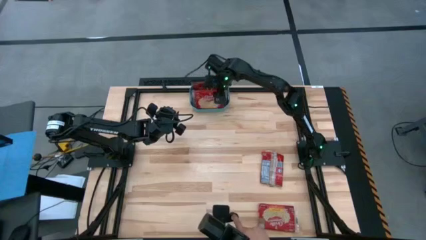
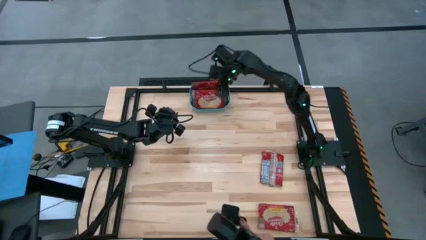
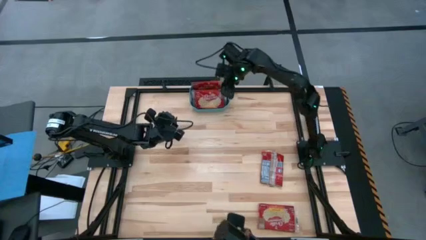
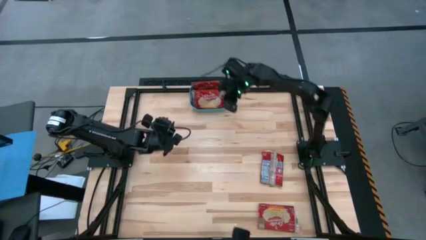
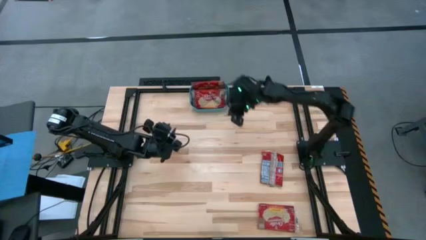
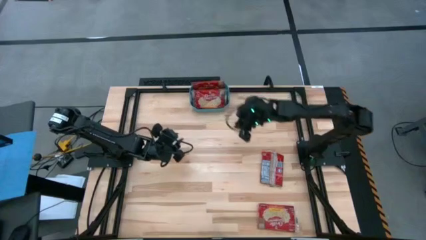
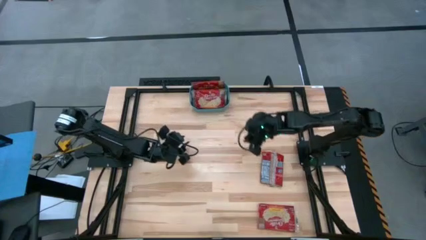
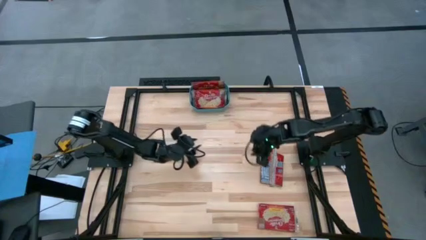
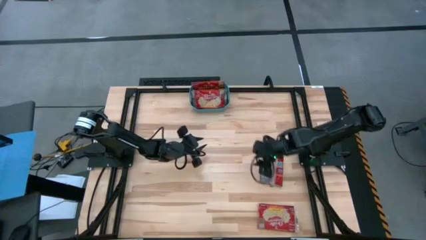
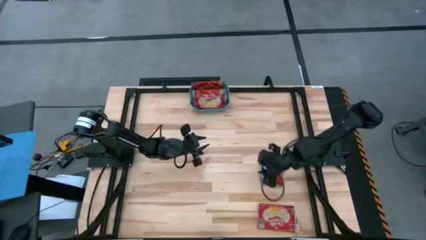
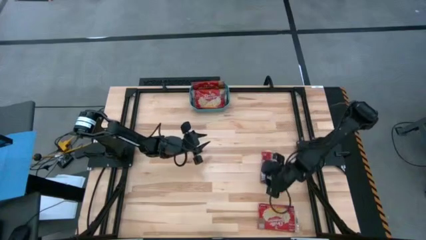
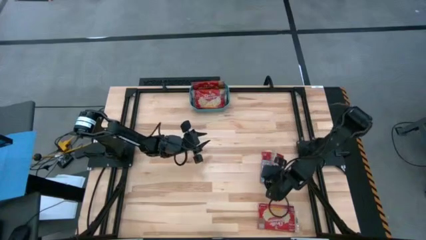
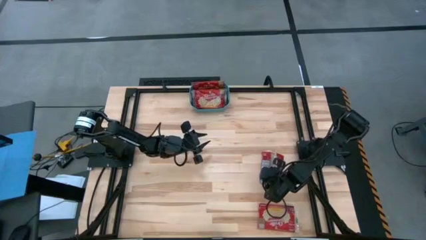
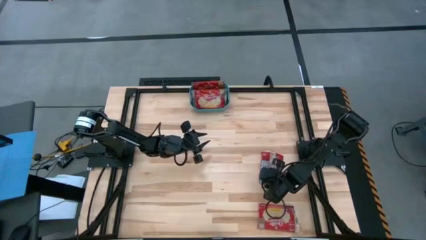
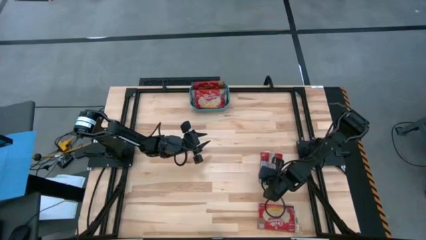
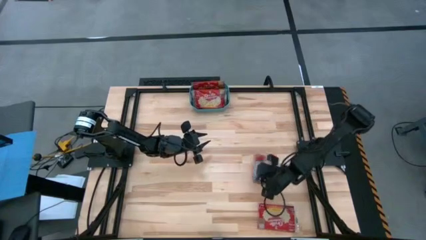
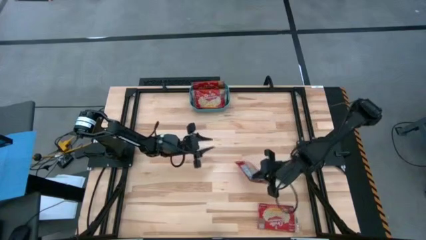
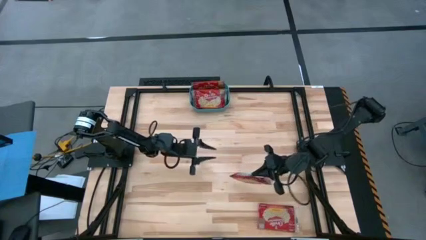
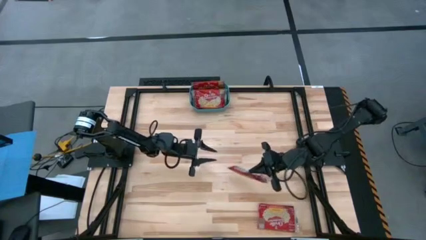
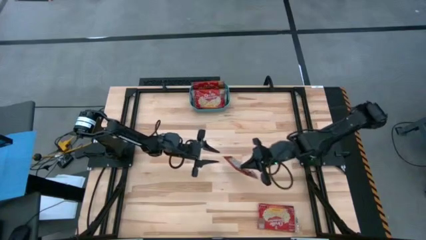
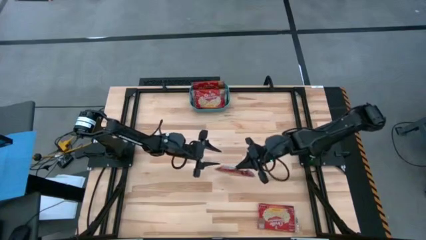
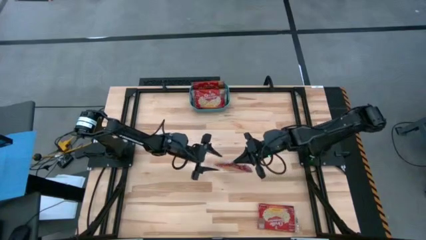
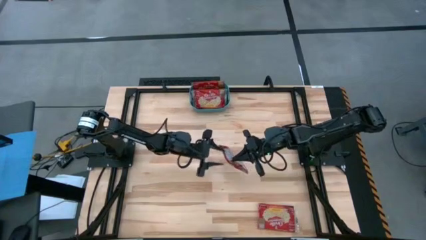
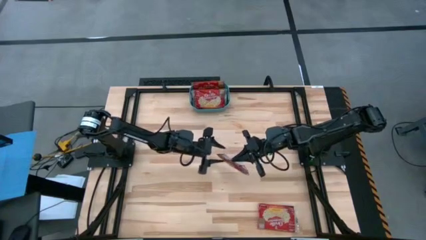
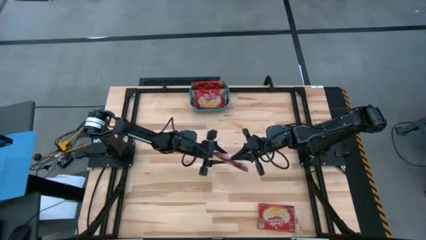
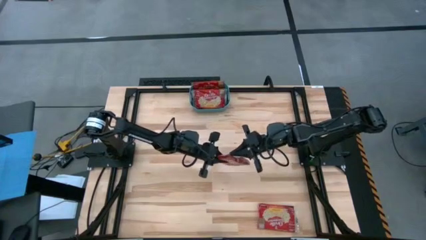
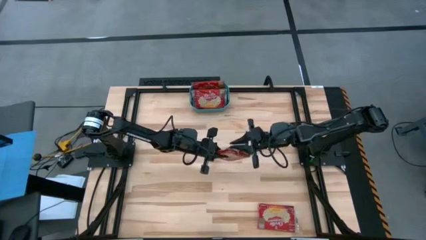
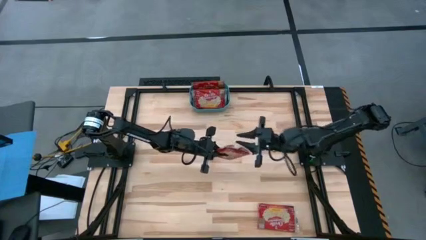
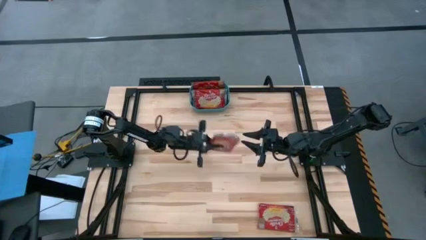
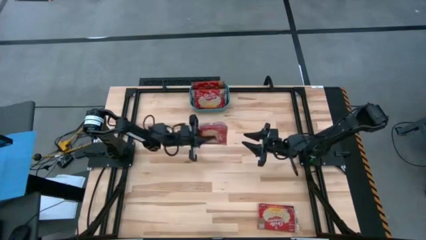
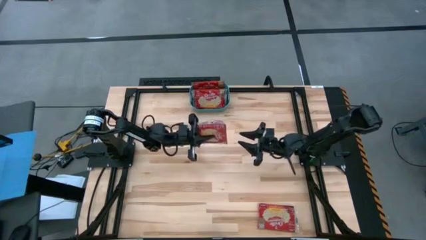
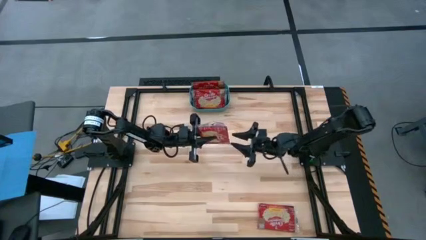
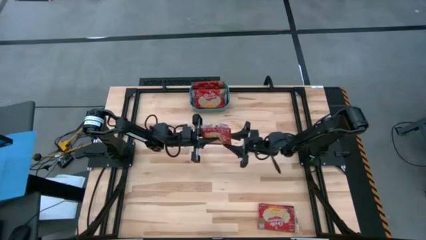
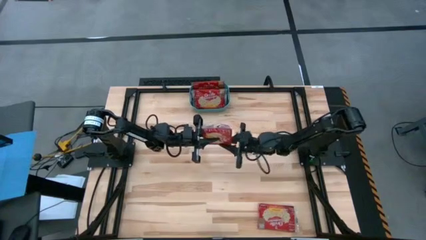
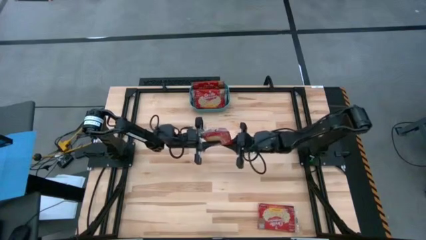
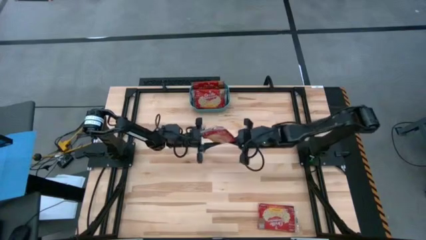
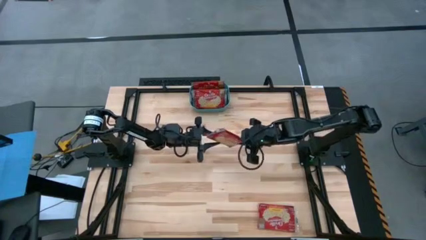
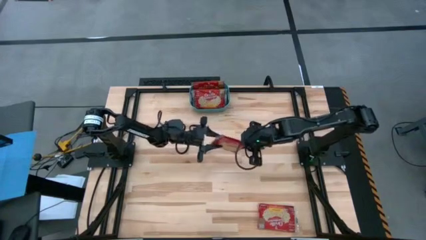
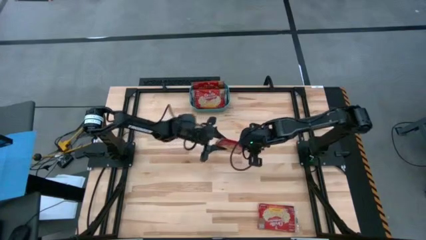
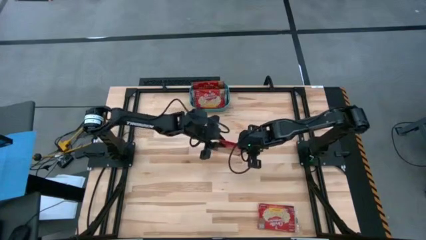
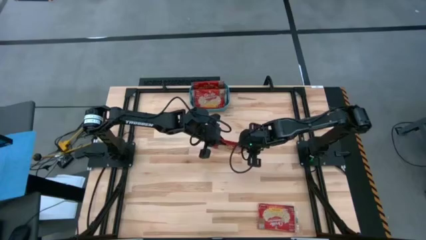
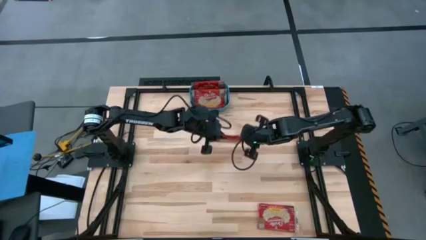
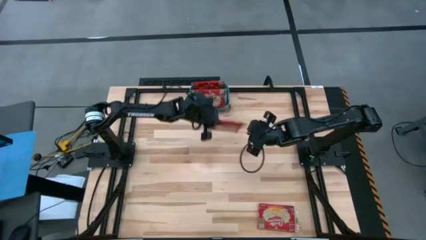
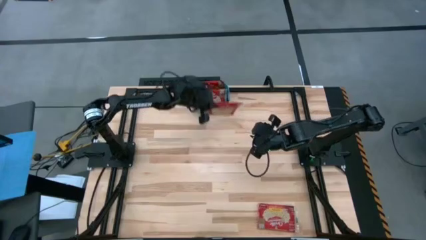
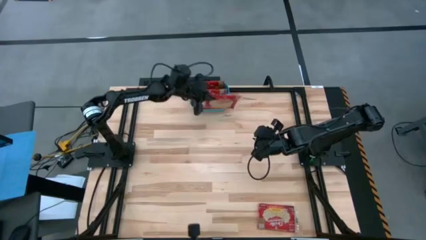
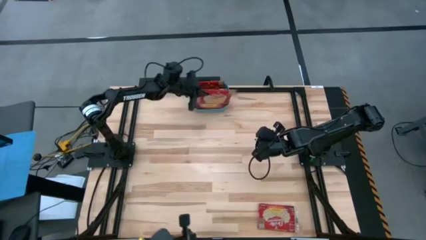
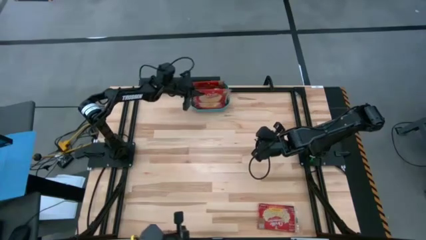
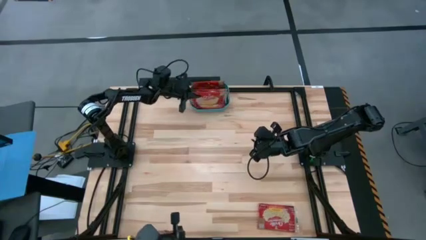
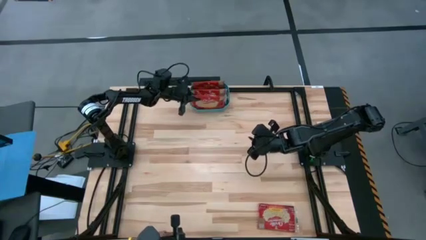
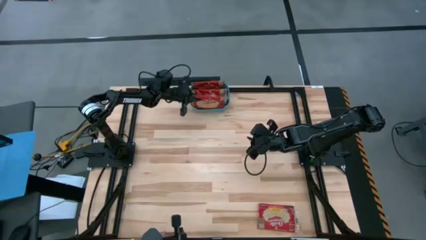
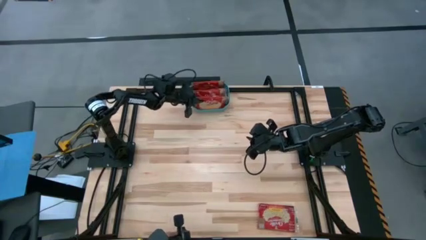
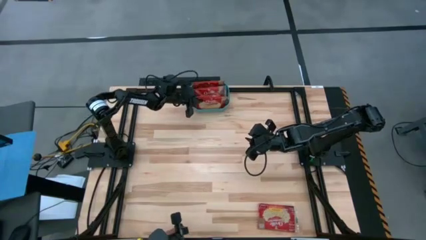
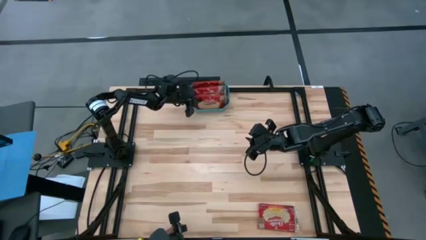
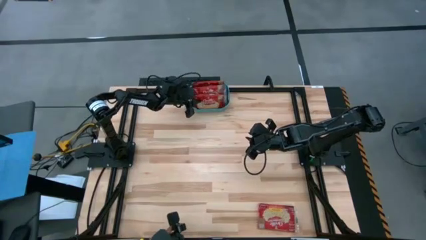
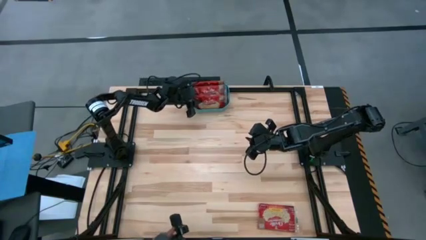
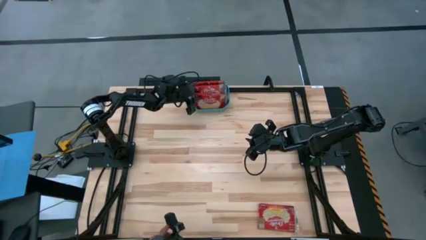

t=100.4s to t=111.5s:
Task: Sort popcorn bags into baskets
Put the red popcorn bag into the green basket

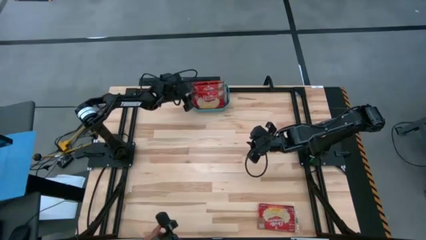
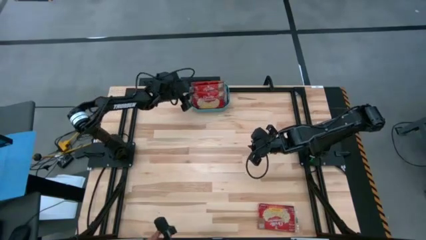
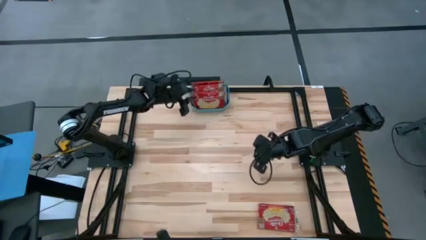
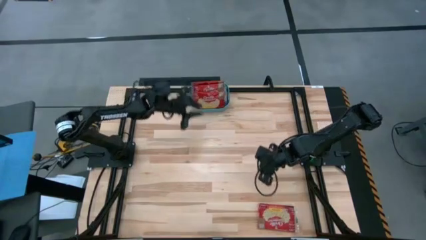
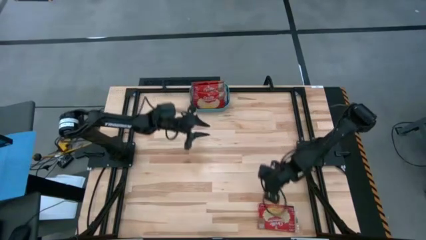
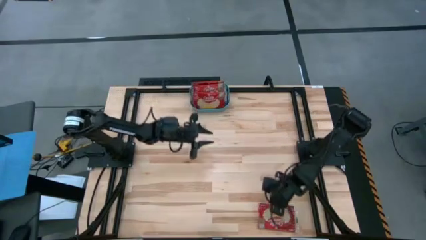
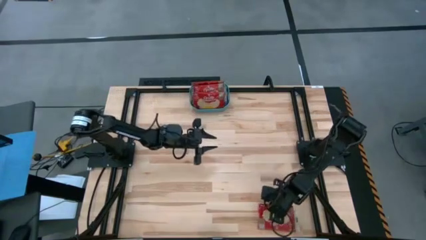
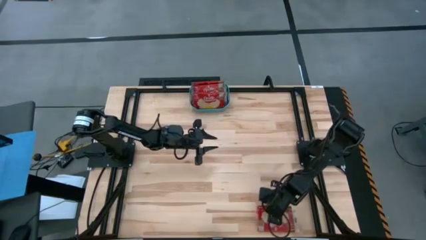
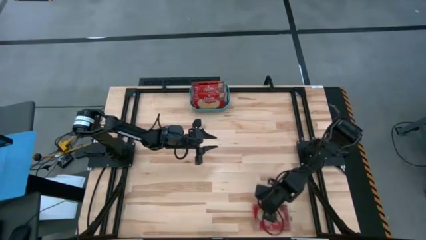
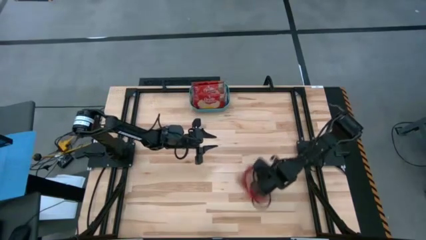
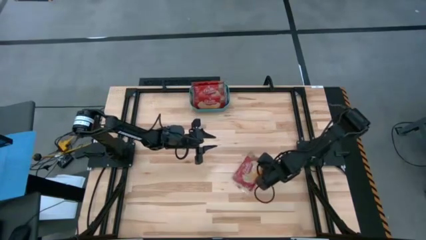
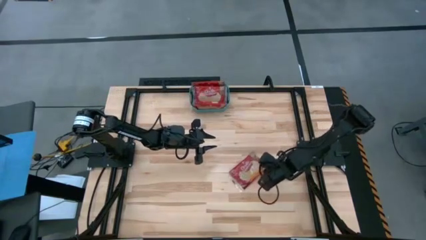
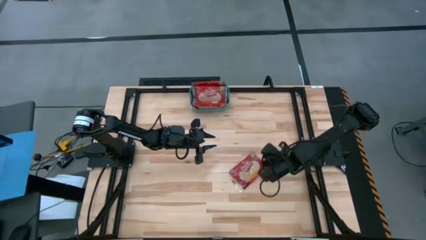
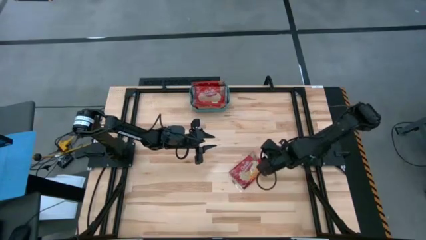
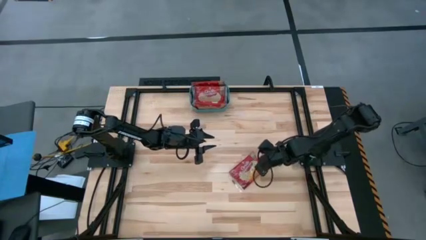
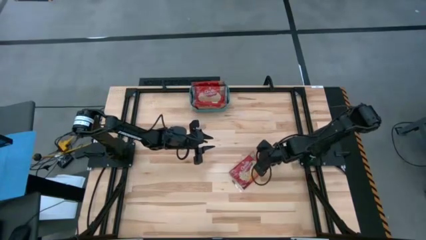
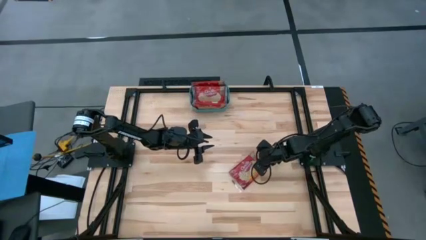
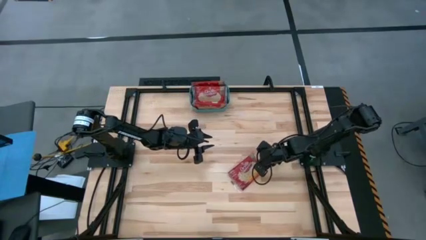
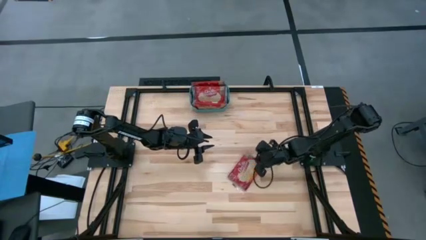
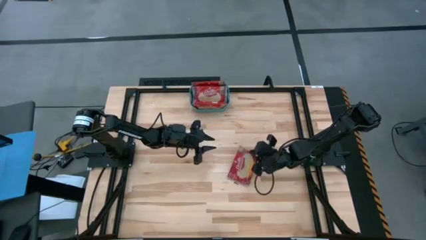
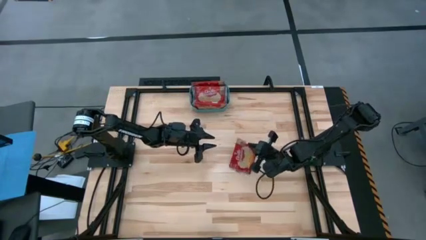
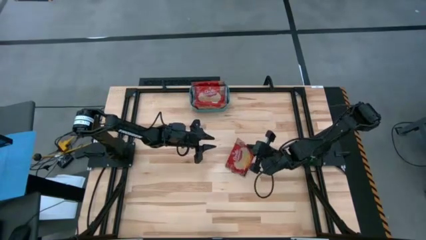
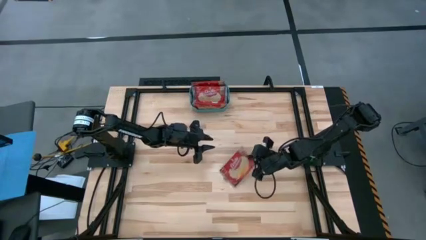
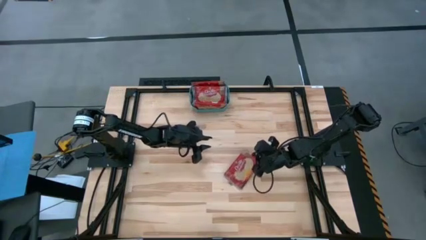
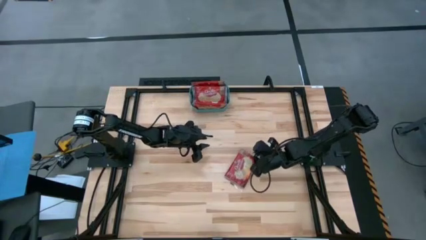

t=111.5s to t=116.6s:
Put the red popcorn bag into the green basket
